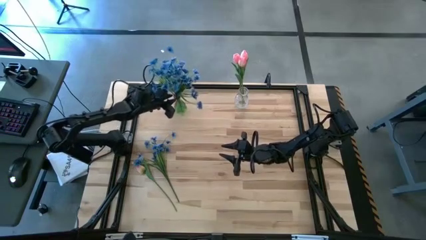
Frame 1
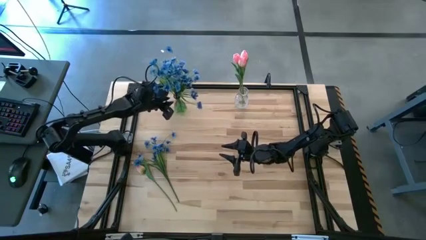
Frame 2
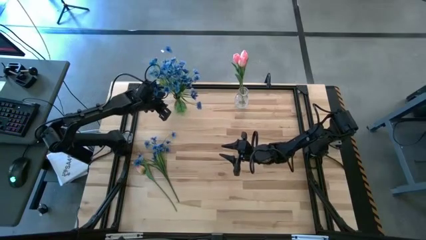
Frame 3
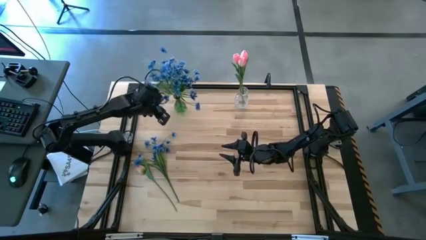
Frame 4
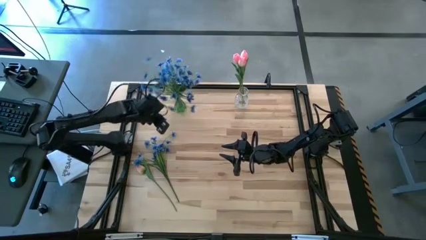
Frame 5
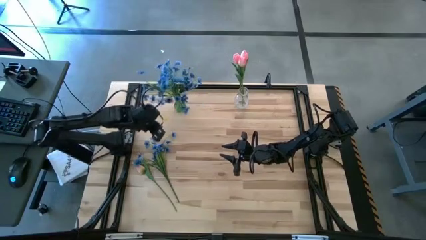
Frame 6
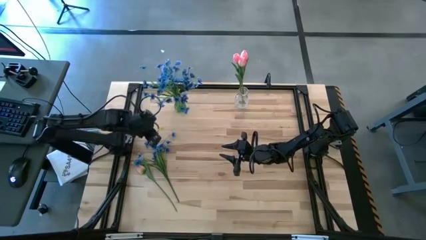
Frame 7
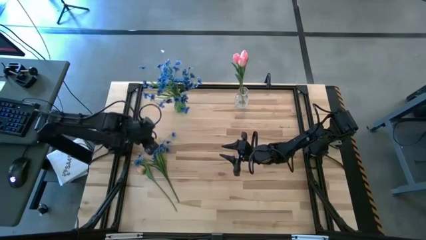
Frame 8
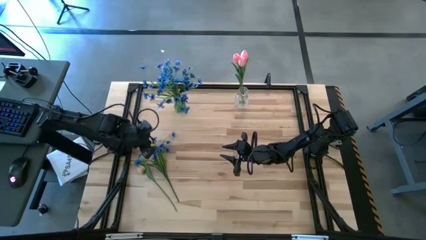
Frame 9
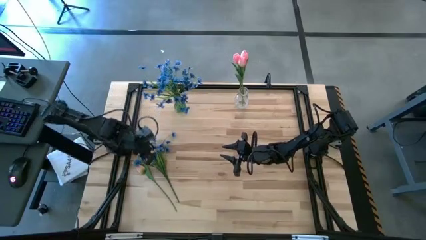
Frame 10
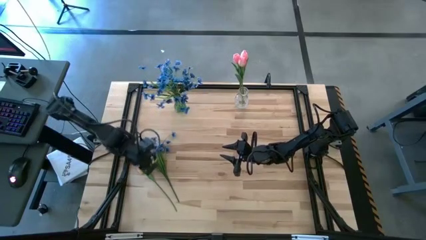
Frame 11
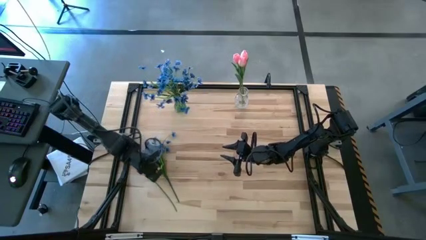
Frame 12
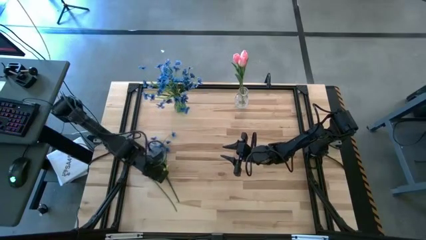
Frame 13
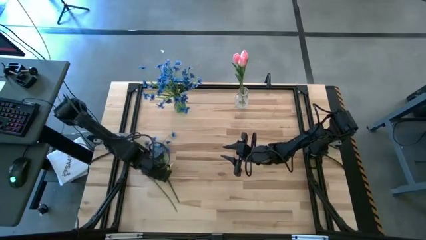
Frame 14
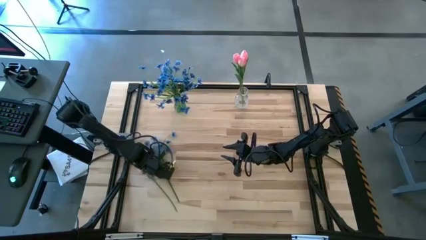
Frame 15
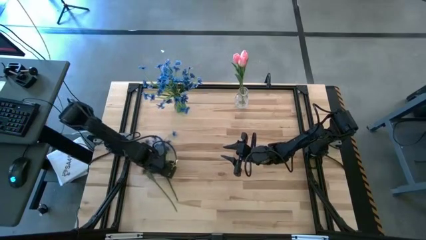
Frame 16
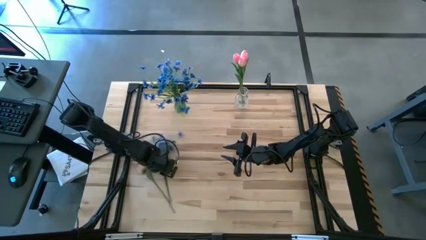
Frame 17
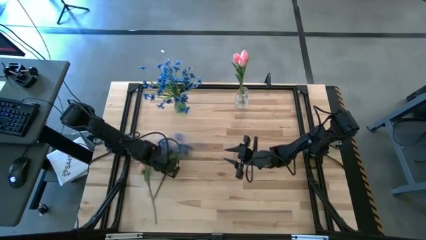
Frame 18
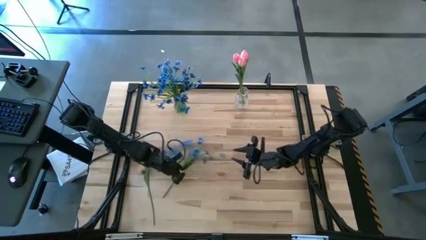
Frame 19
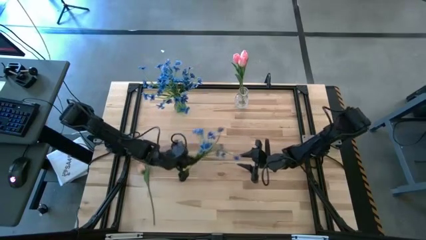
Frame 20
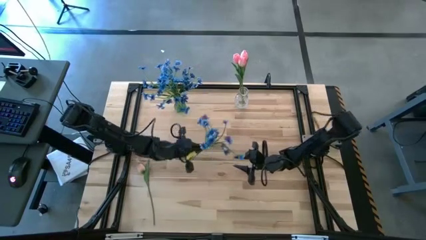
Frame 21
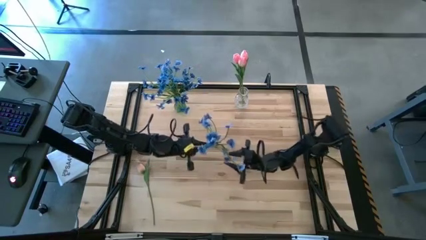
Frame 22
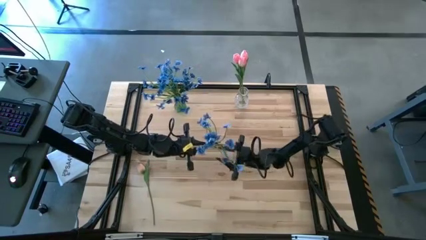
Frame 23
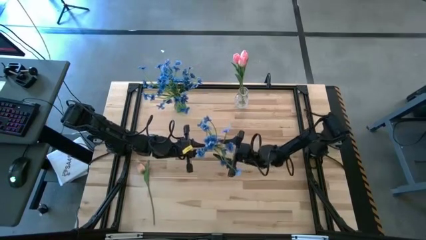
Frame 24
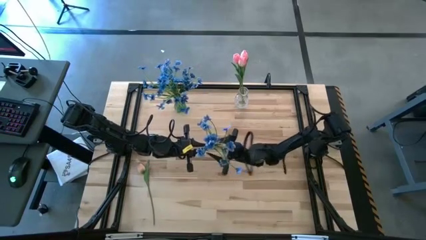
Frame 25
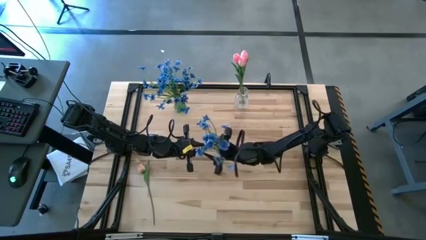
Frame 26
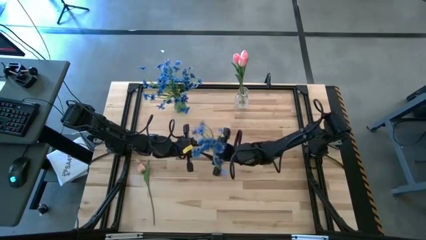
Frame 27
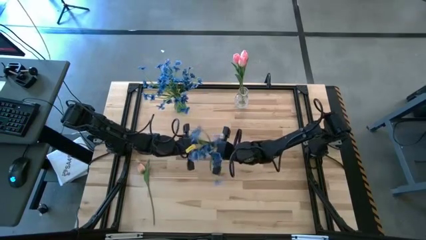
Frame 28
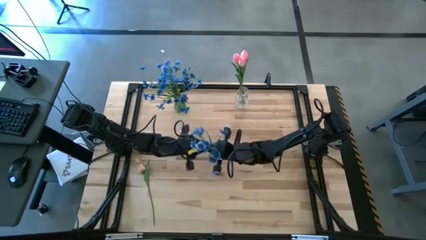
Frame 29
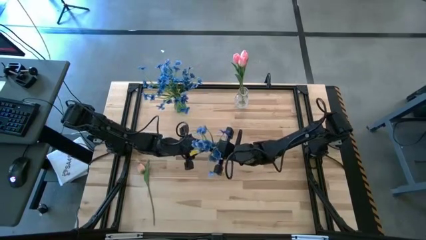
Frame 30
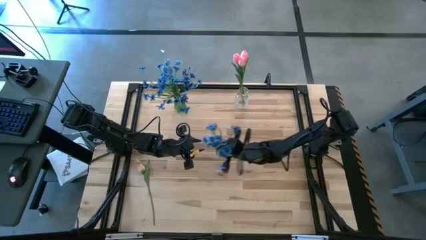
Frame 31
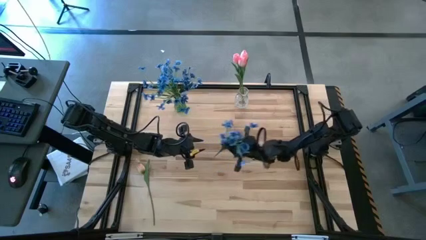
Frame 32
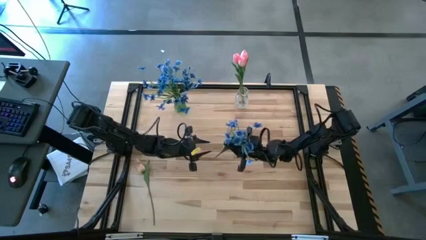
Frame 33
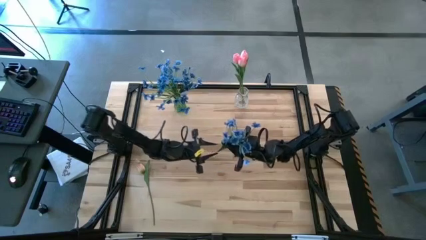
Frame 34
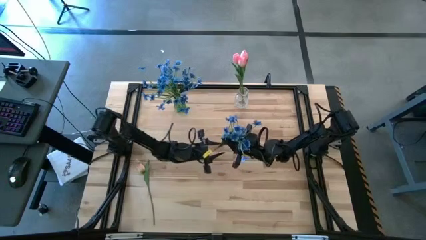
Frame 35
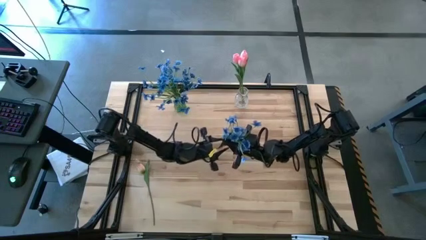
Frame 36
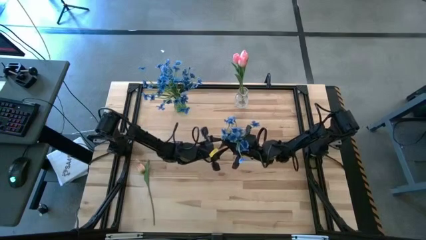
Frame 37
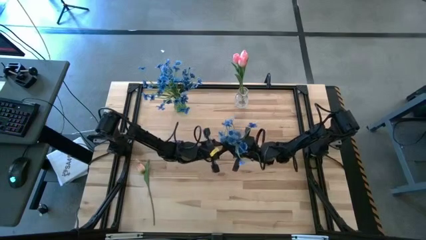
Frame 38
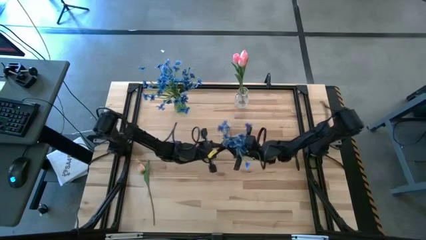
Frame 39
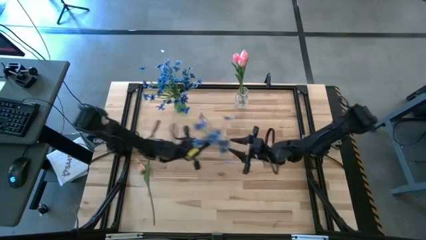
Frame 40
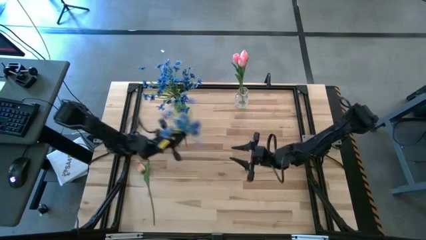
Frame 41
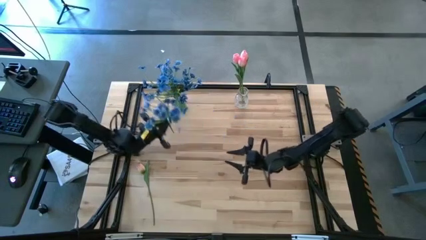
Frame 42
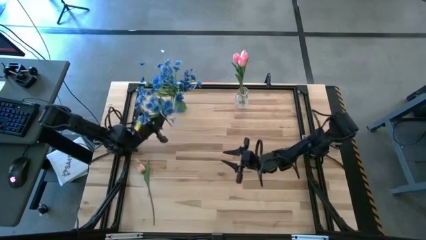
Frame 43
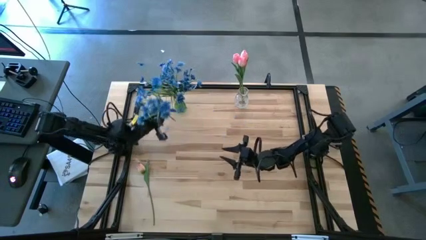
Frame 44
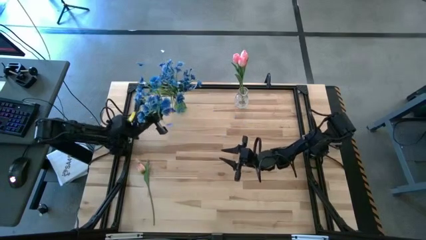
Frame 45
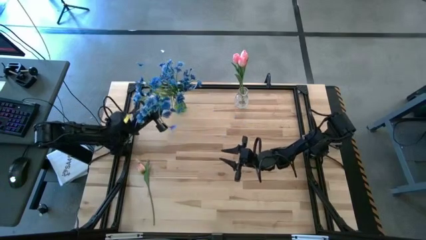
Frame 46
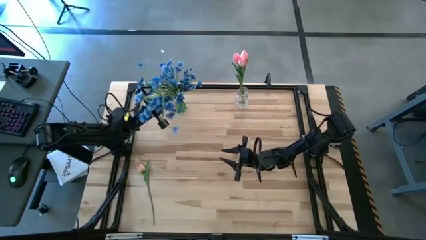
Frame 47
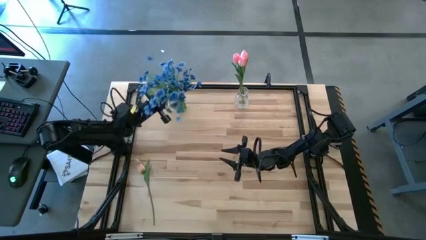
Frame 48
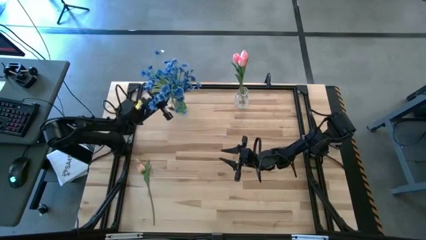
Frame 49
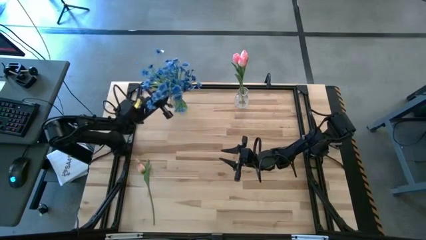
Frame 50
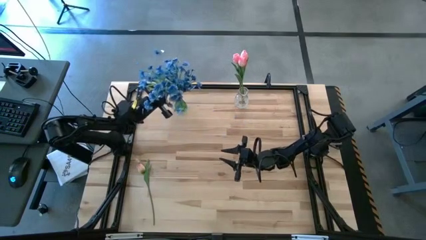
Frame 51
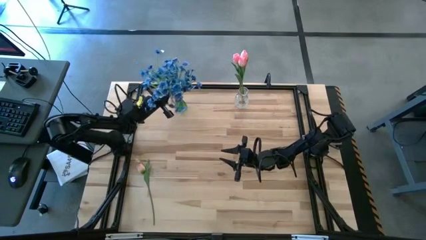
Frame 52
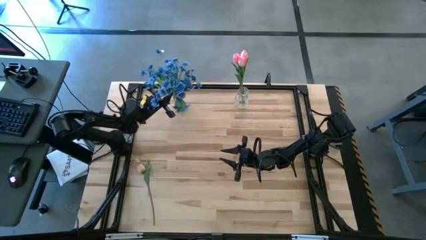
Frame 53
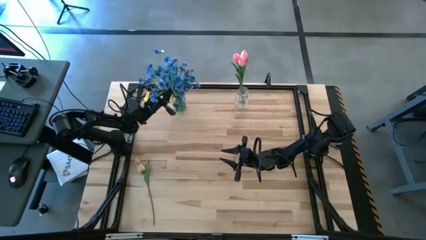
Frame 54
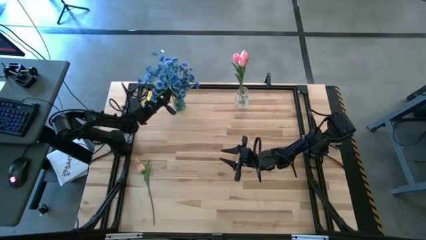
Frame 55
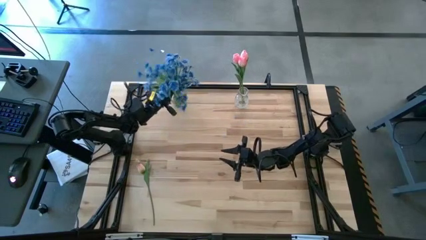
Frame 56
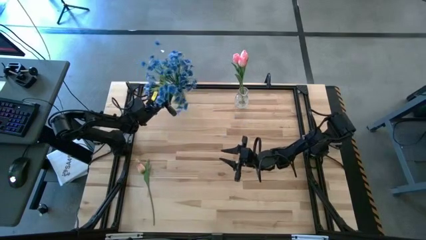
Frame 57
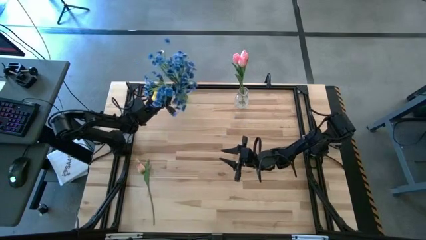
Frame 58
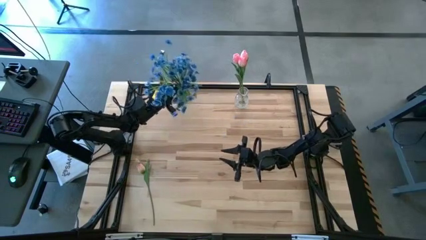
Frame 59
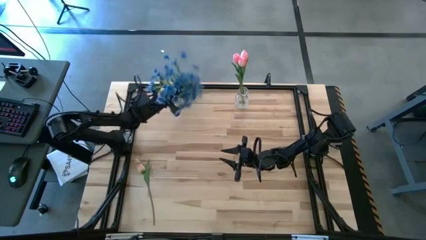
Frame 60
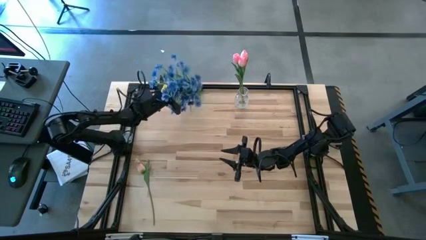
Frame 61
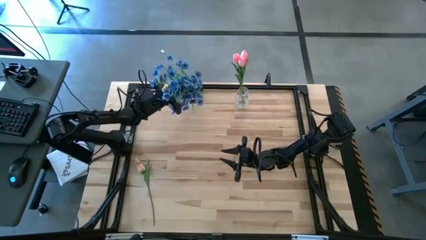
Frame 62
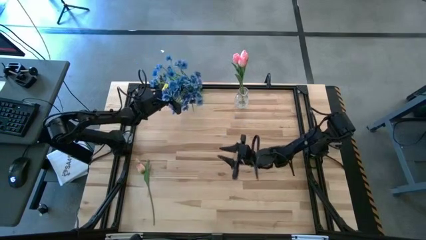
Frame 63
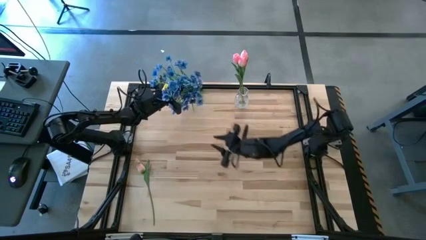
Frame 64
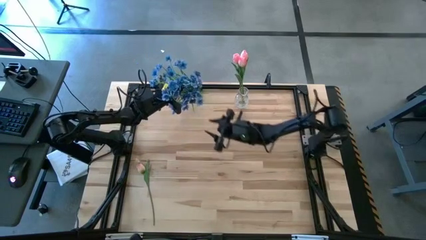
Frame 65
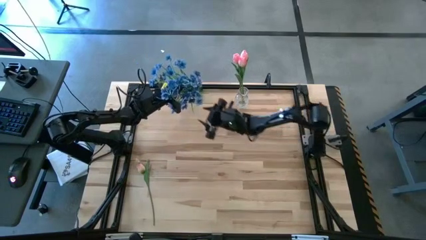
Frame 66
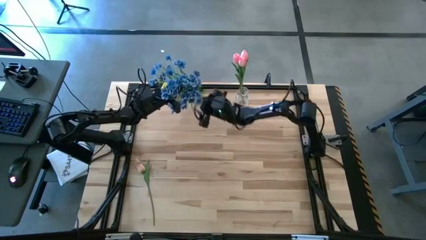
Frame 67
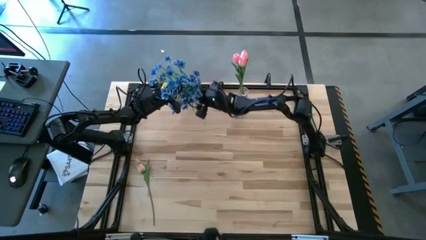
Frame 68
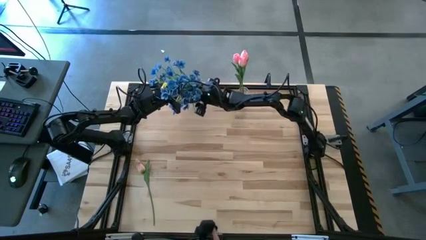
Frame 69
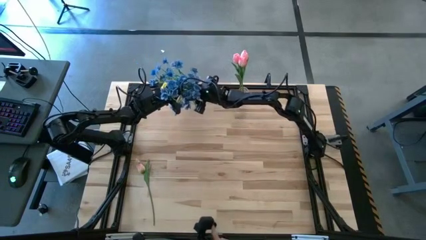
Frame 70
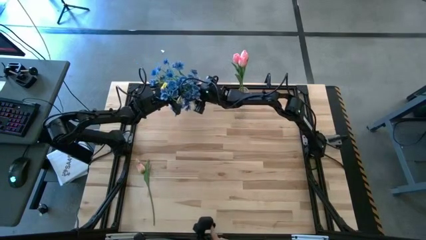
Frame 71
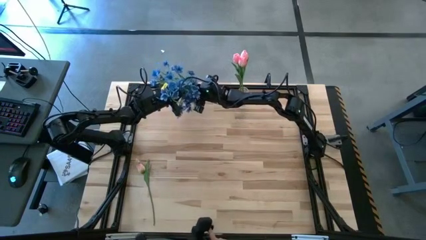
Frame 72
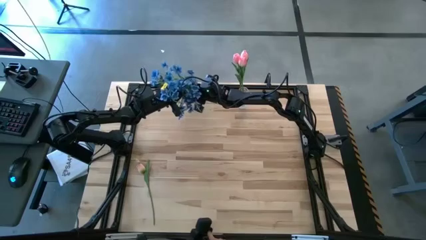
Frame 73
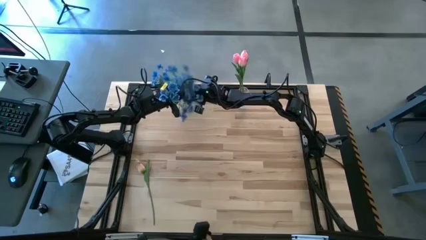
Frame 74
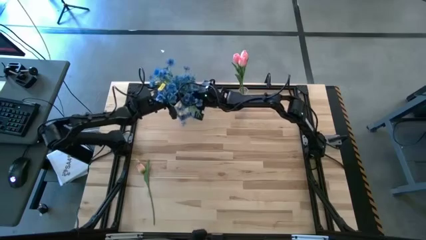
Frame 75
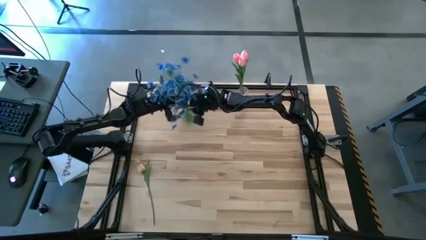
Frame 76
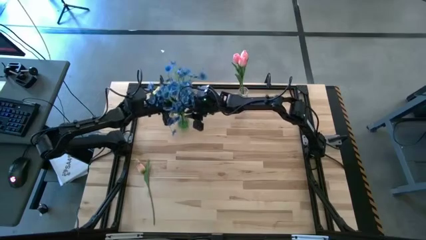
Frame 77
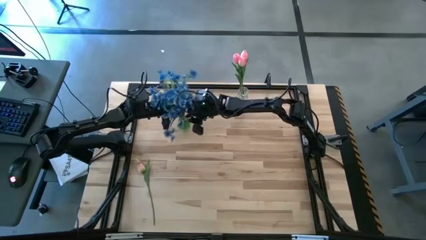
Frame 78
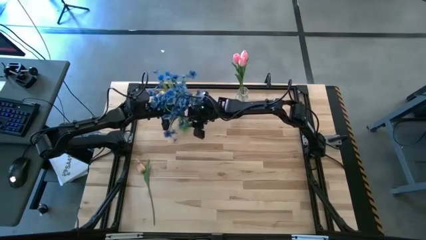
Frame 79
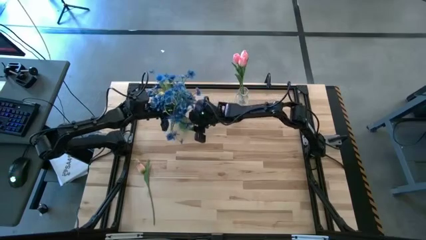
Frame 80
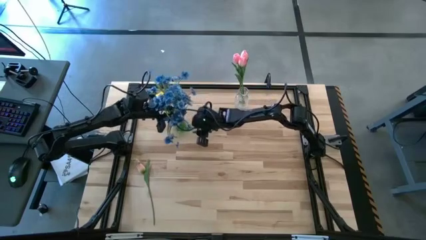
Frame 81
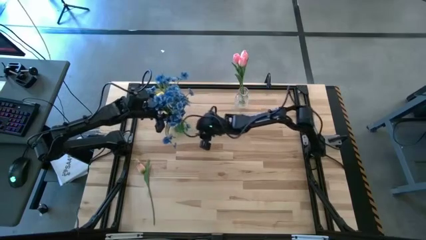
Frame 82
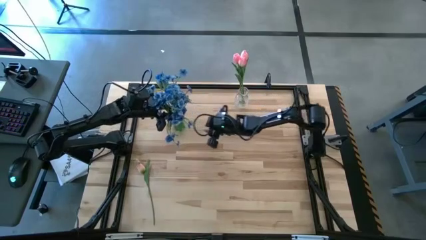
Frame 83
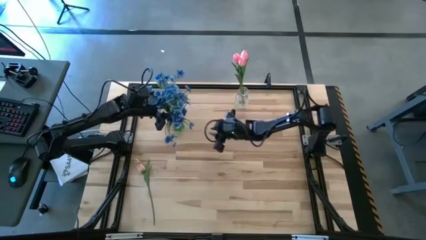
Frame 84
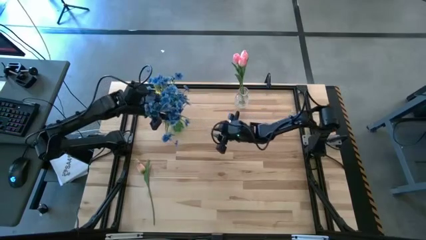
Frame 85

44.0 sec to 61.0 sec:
Task: Sort flowers into vase by color
Put the blue flowers into the green vase
